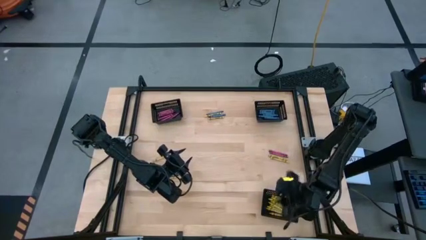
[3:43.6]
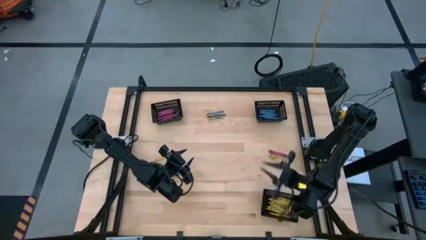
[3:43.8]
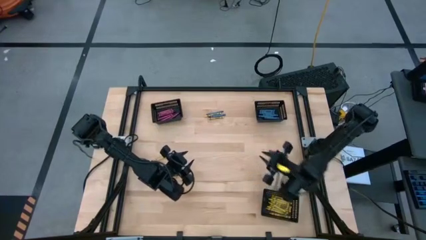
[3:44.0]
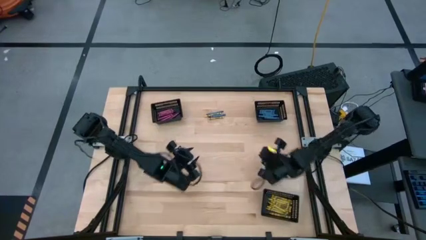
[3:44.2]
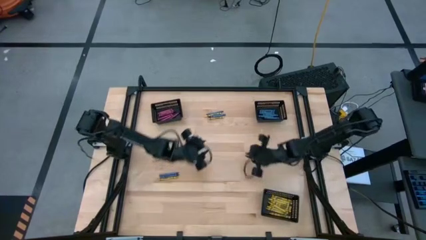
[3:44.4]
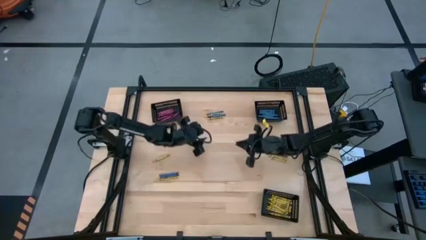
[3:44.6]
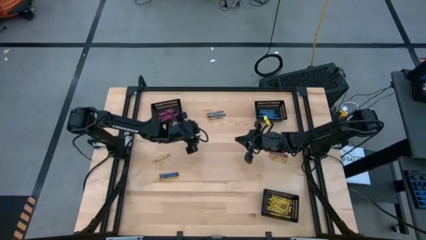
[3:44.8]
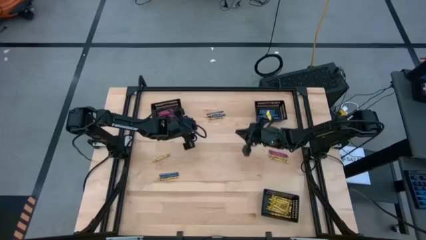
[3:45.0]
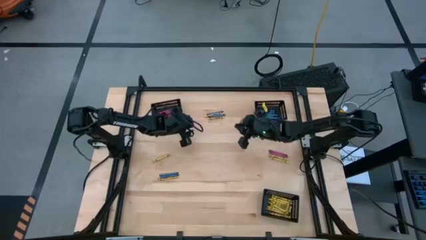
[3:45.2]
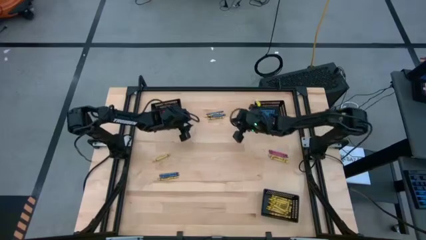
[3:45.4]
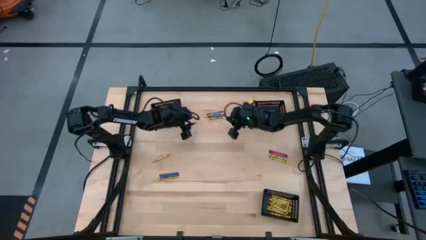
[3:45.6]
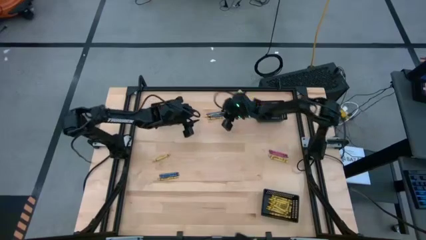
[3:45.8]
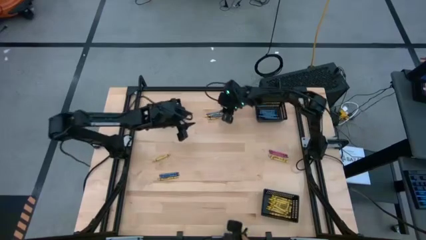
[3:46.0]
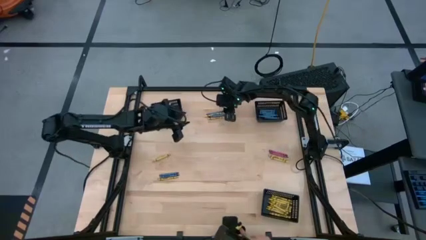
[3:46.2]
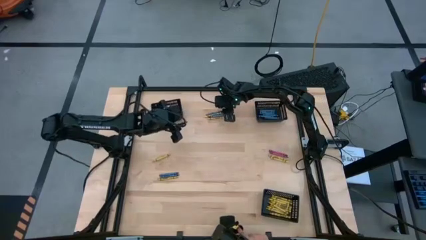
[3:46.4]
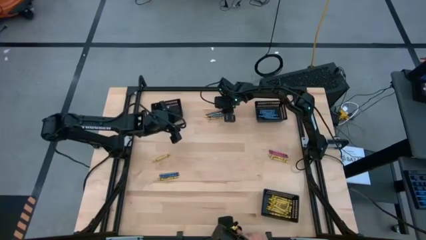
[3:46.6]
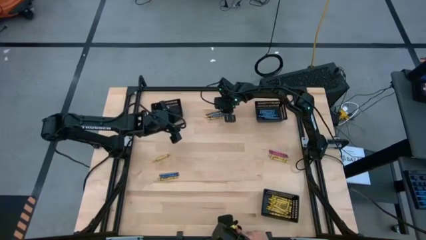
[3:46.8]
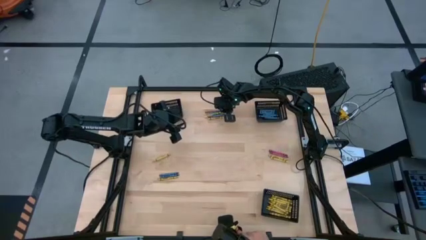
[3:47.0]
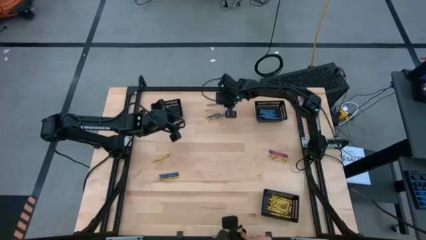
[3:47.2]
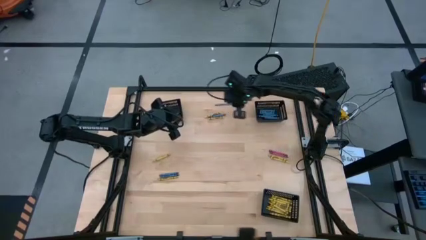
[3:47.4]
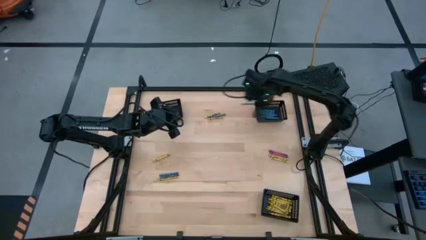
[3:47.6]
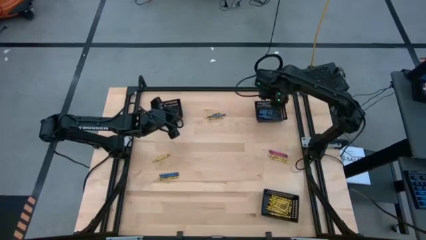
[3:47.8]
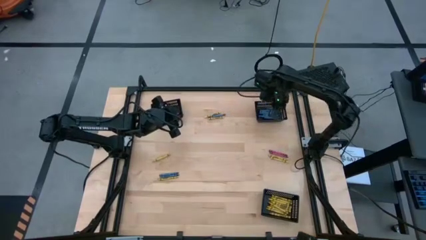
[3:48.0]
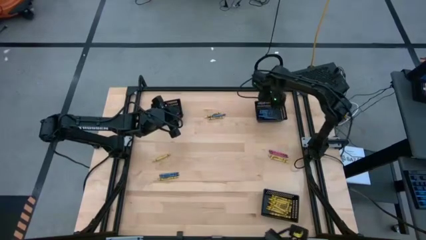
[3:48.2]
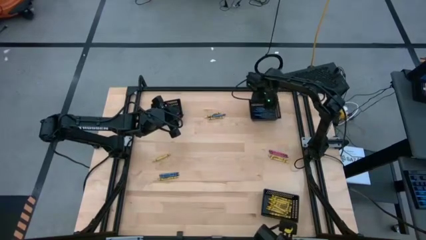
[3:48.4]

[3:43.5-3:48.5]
Task: Sort crayons
Put the blue crayon into the top right black bin

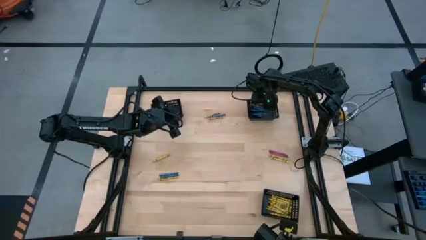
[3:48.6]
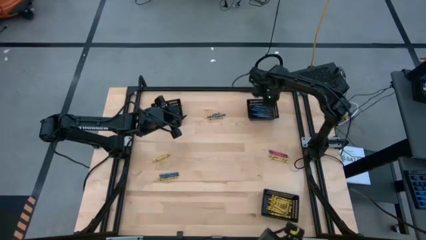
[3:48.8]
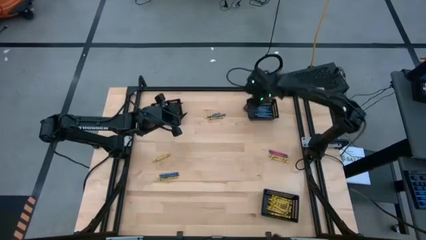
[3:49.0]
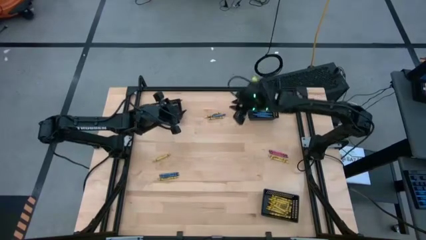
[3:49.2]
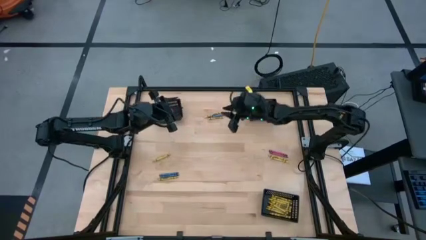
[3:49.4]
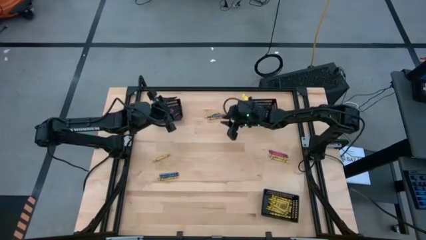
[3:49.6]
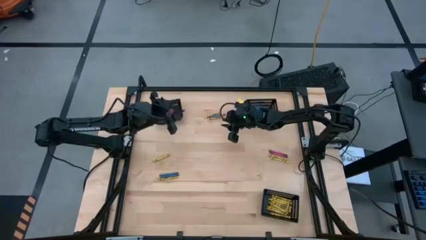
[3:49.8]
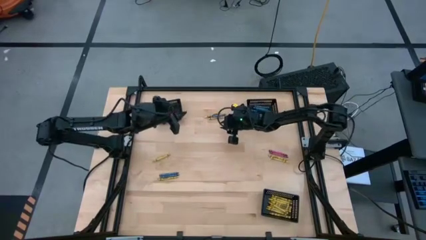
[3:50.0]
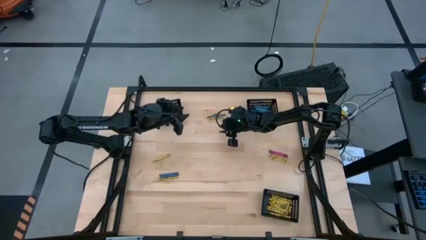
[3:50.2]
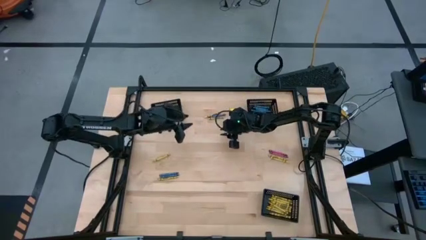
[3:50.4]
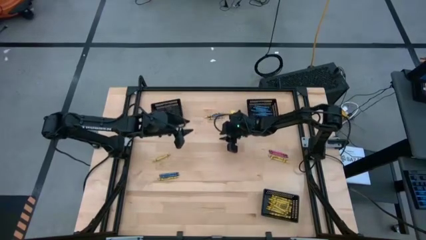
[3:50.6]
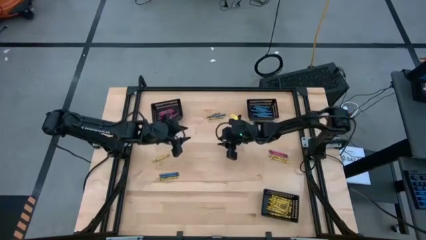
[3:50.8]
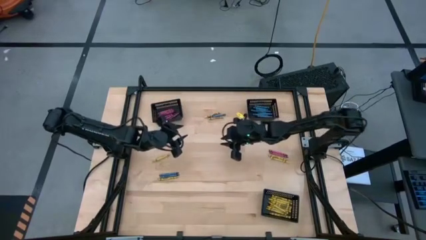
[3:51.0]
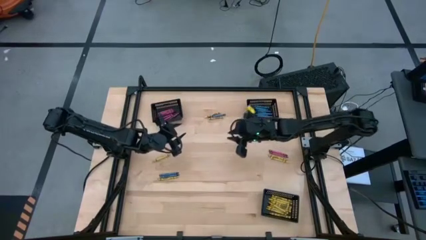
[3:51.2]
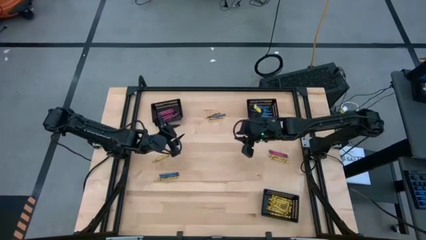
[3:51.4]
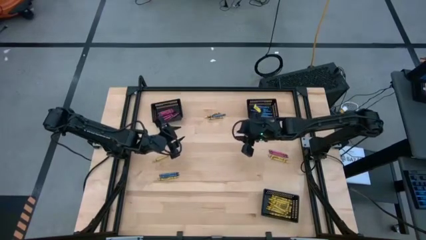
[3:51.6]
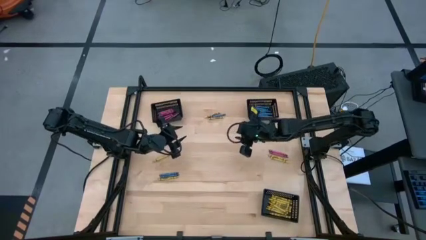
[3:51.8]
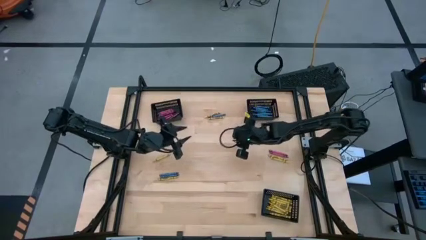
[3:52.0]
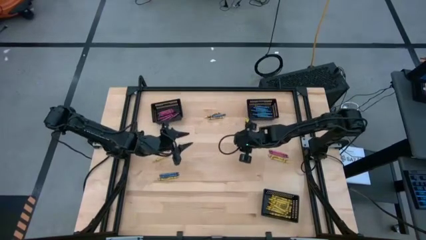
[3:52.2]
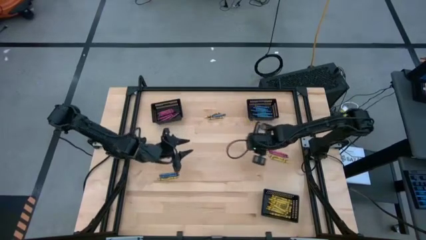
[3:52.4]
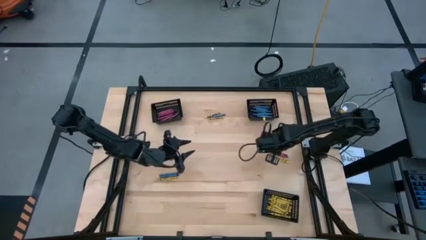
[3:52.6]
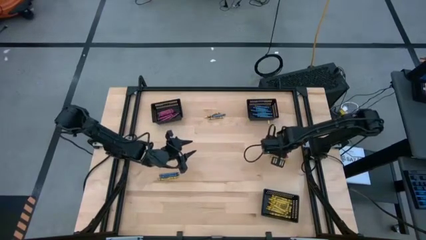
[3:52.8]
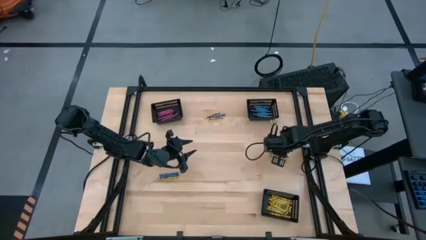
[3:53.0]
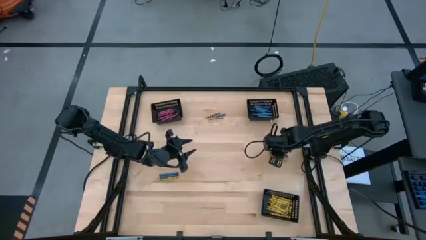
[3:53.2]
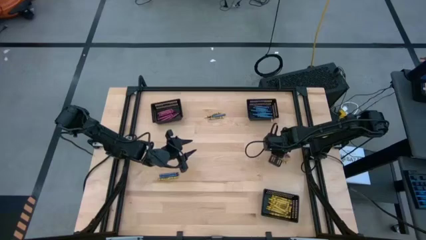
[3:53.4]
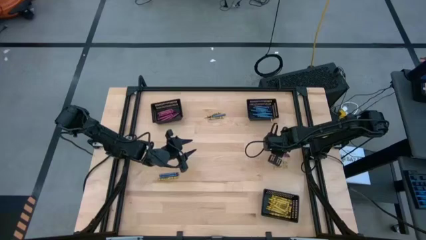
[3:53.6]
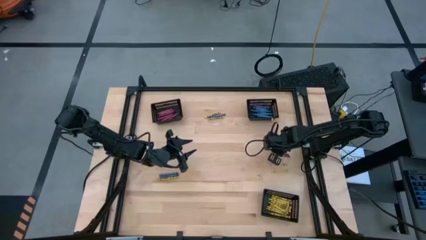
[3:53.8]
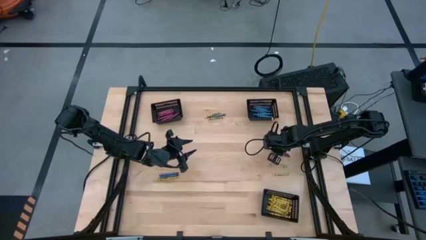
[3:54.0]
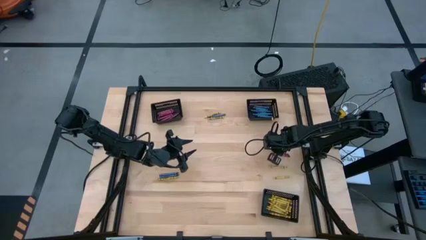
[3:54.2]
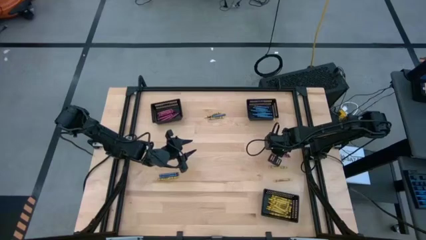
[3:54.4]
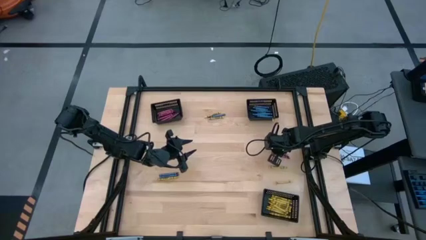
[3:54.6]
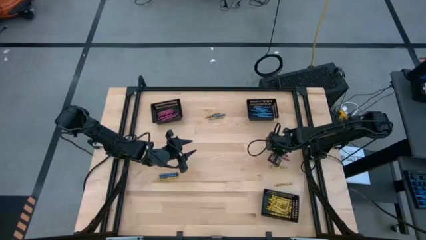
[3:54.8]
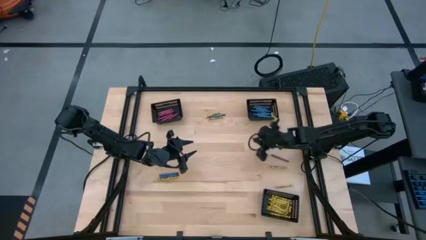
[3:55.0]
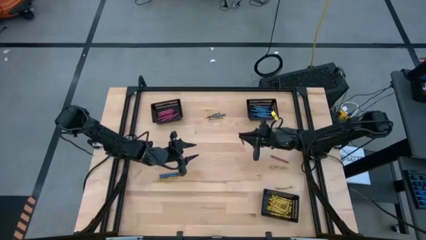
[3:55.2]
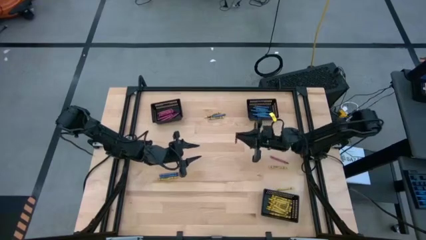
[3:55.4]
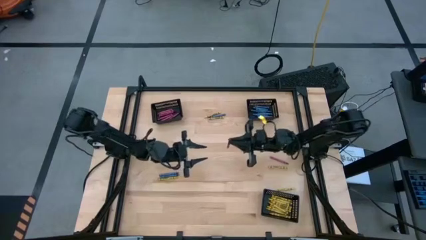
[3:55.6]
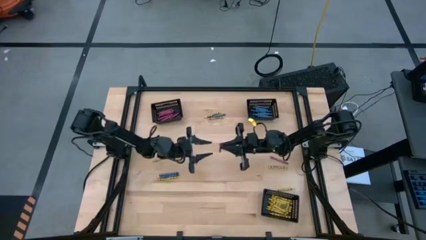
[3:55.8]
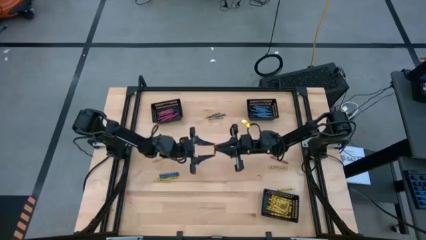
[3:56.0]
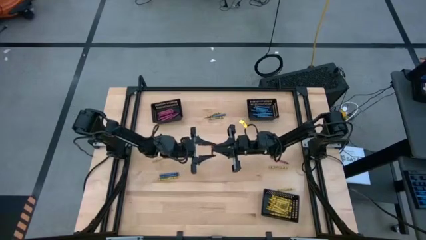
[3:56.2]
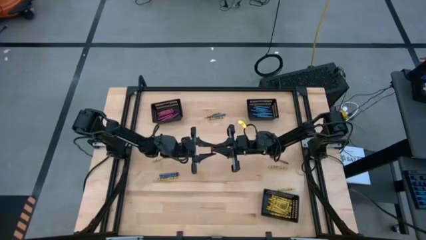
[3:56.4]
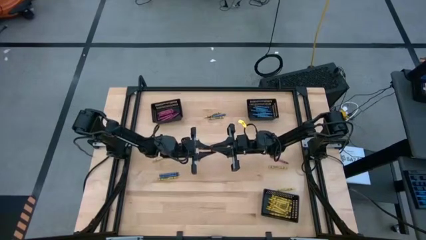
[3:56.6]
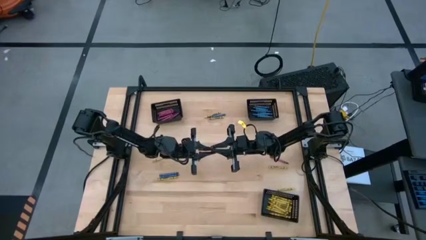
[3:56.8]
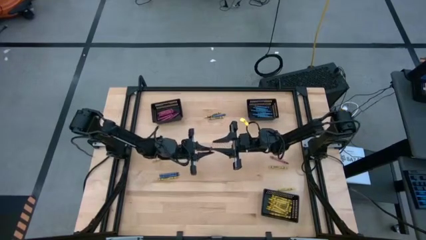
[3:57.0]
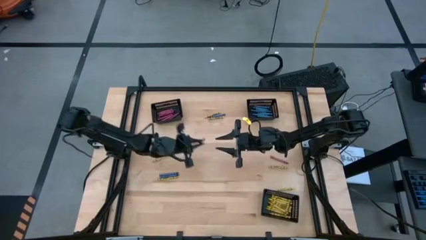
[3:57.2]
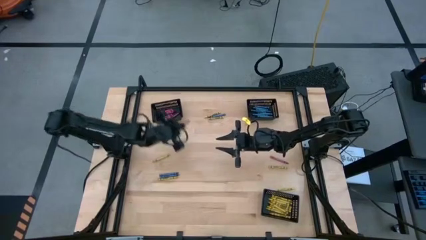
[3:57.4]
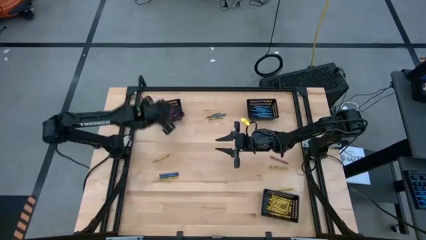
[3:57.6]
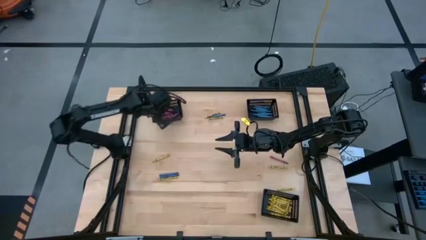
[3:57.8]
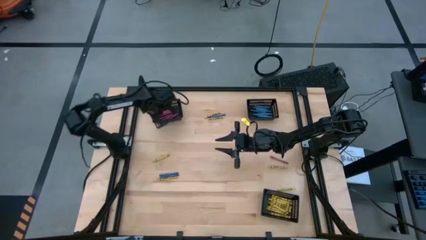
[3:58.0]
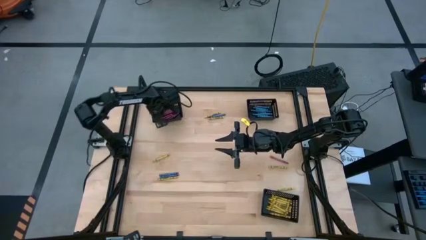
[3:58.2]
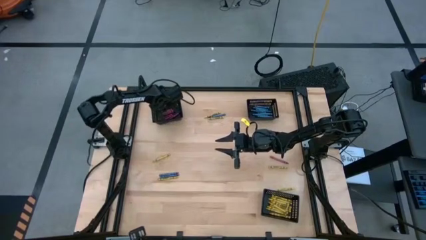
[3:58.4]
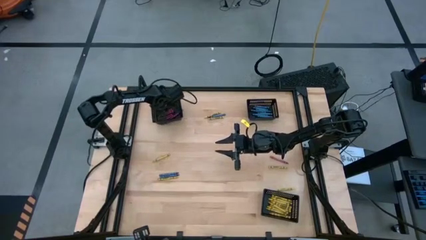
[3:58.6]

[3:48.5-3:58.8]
Put the red crayon into the top left black bin
